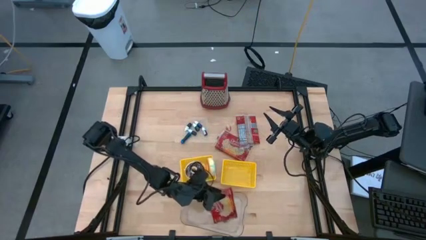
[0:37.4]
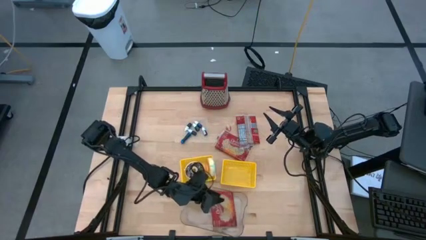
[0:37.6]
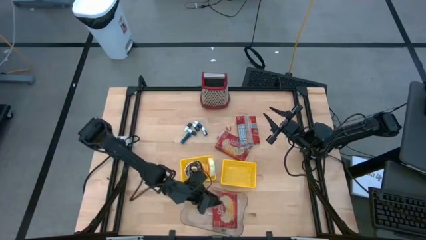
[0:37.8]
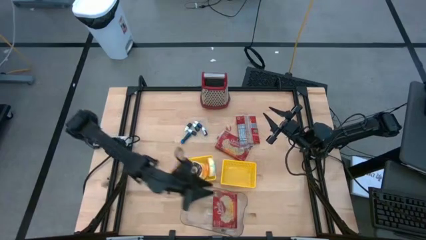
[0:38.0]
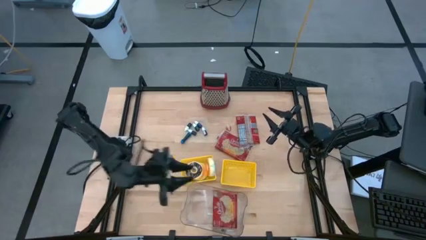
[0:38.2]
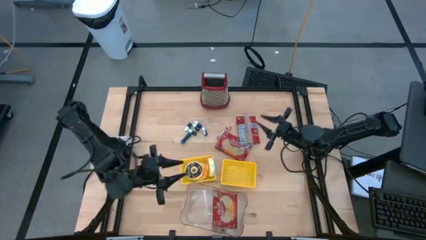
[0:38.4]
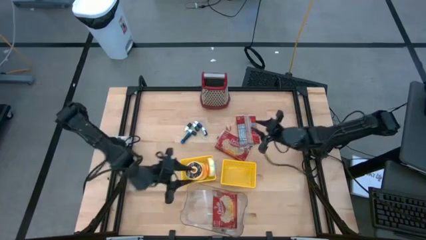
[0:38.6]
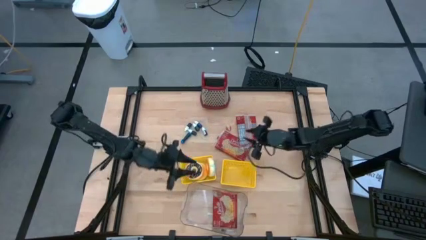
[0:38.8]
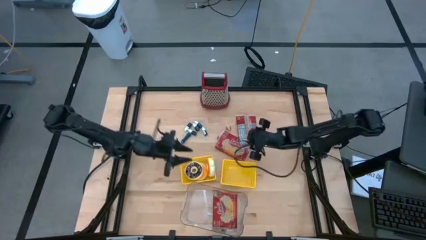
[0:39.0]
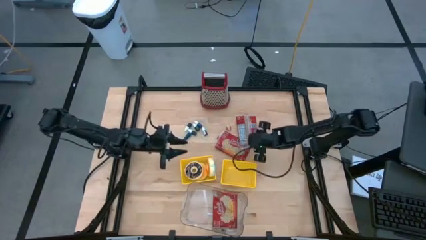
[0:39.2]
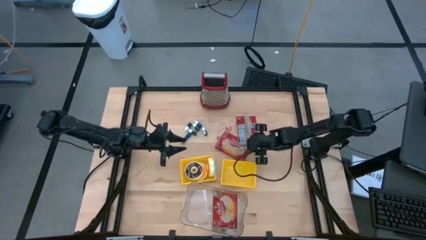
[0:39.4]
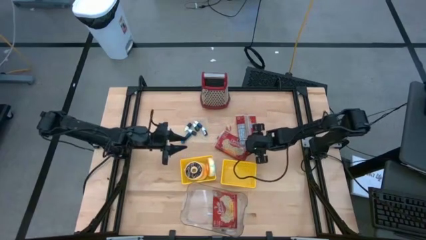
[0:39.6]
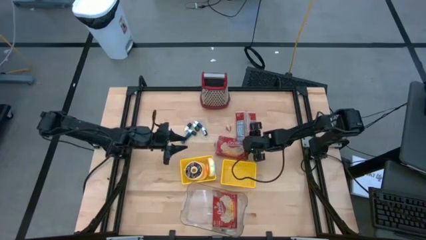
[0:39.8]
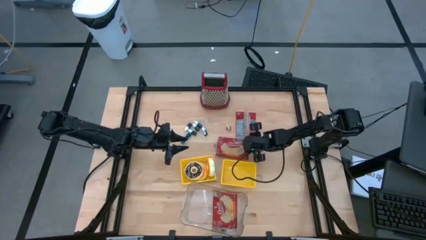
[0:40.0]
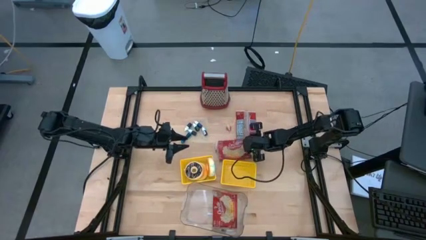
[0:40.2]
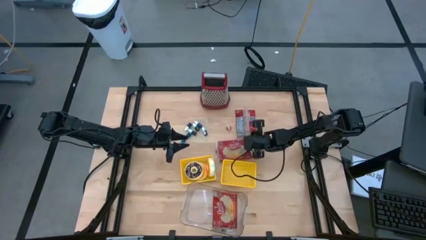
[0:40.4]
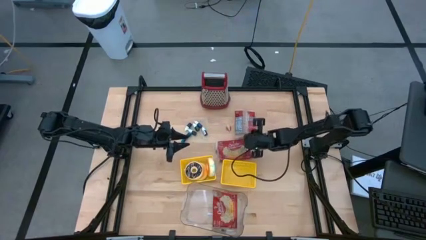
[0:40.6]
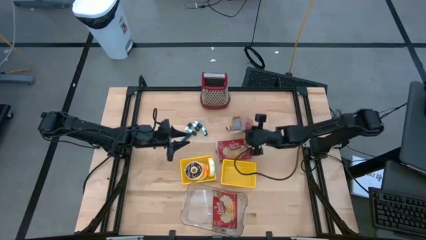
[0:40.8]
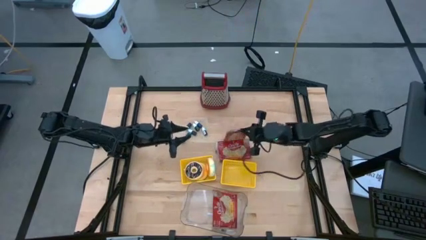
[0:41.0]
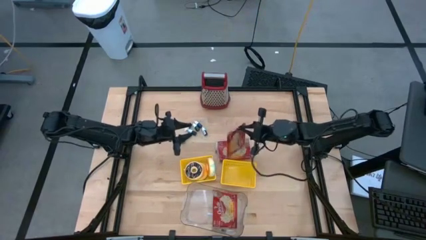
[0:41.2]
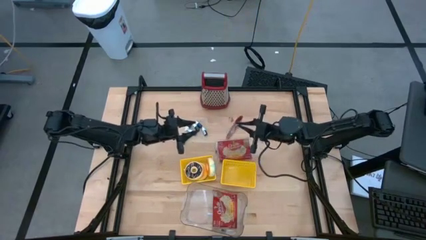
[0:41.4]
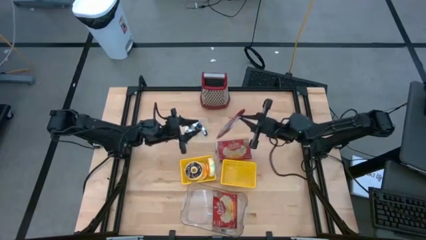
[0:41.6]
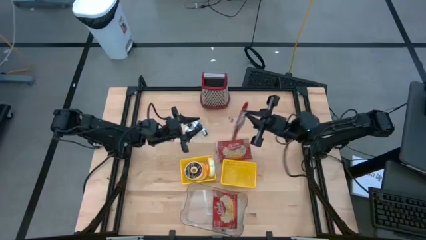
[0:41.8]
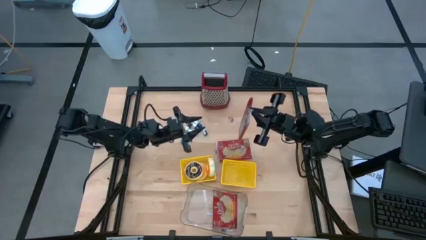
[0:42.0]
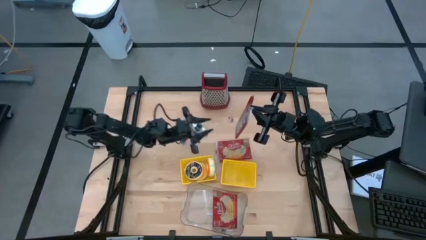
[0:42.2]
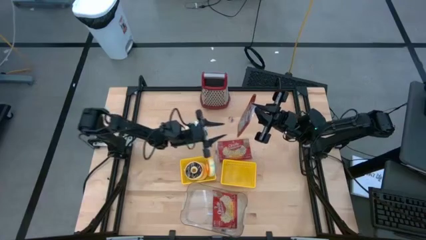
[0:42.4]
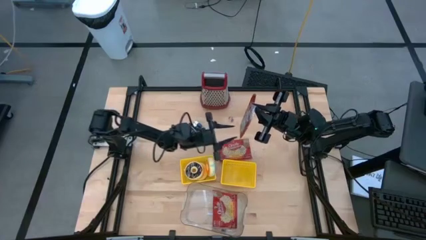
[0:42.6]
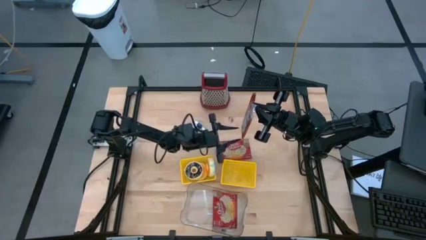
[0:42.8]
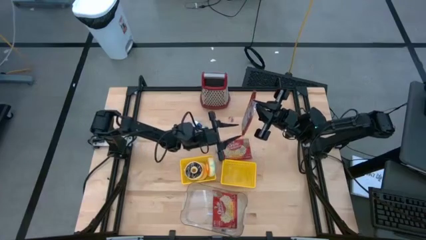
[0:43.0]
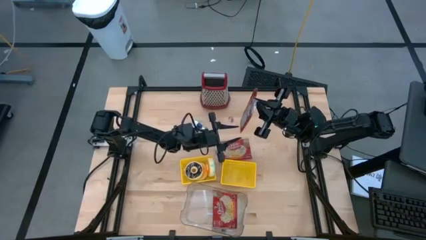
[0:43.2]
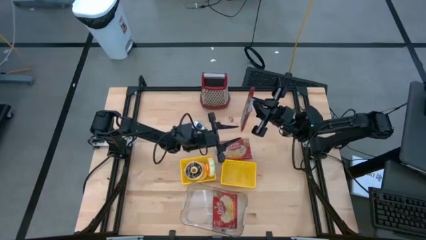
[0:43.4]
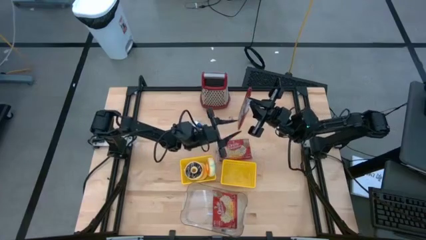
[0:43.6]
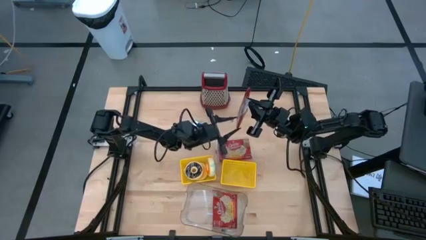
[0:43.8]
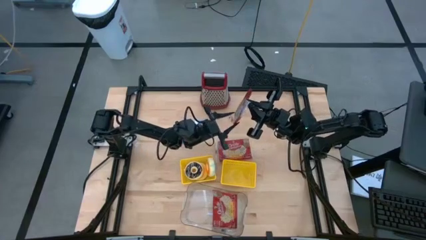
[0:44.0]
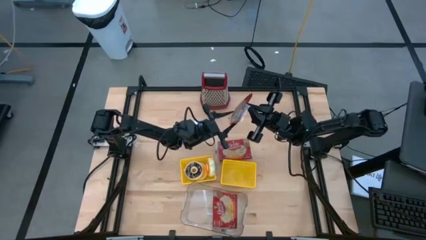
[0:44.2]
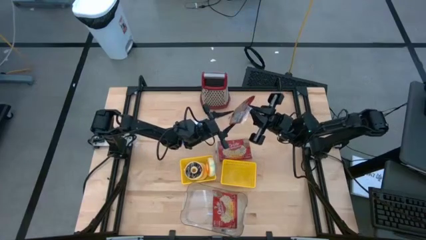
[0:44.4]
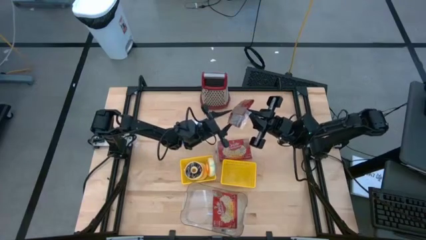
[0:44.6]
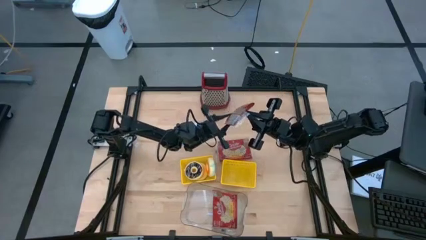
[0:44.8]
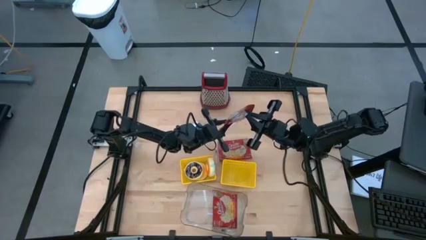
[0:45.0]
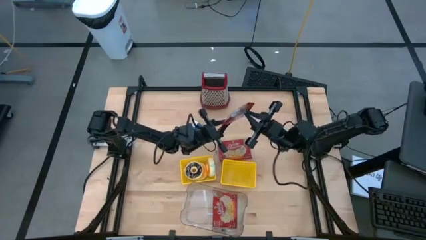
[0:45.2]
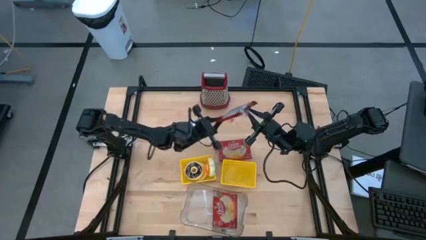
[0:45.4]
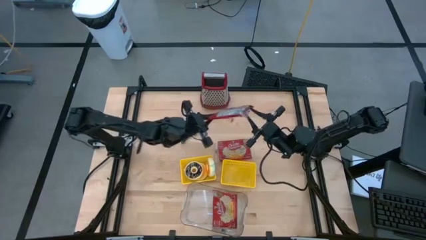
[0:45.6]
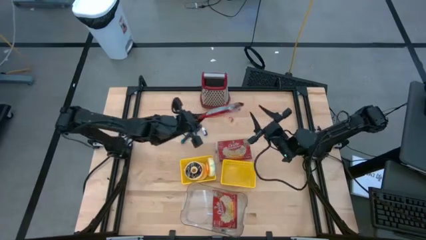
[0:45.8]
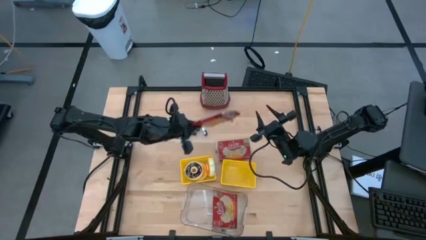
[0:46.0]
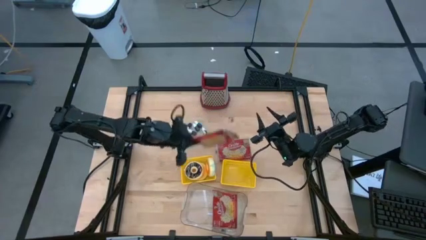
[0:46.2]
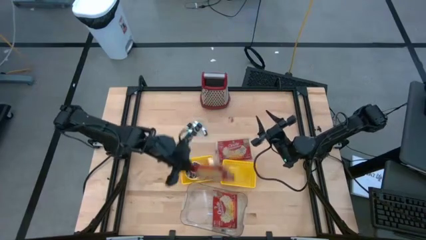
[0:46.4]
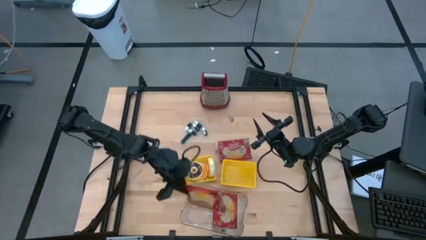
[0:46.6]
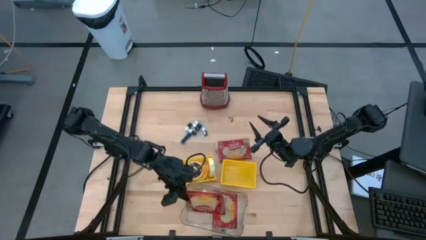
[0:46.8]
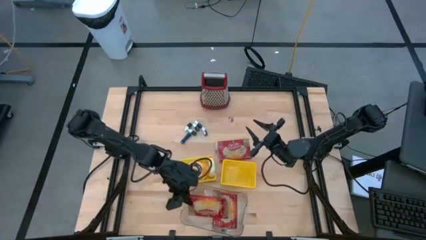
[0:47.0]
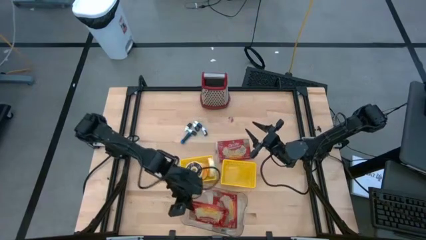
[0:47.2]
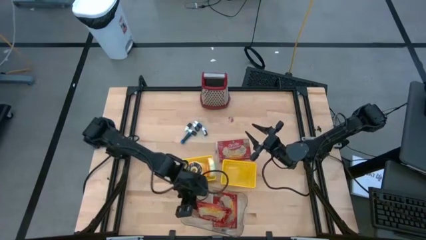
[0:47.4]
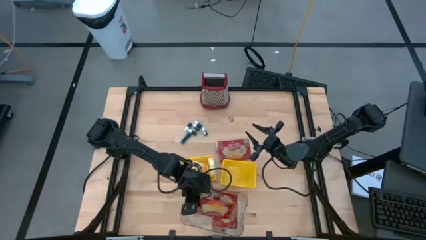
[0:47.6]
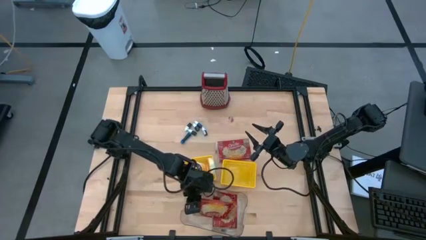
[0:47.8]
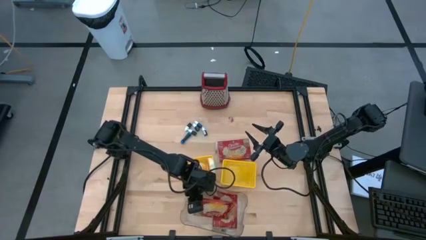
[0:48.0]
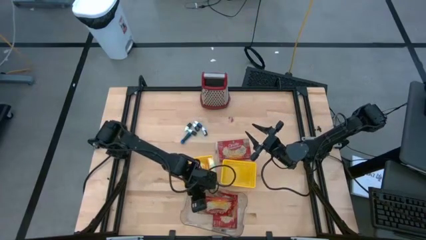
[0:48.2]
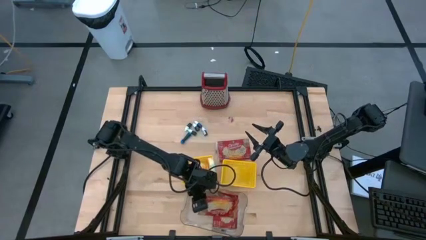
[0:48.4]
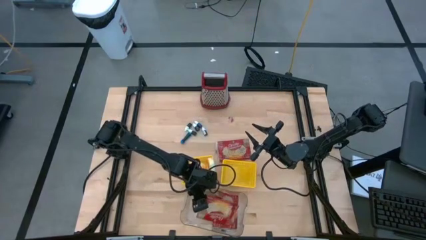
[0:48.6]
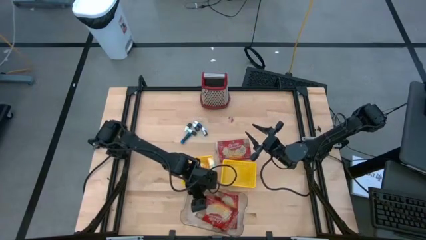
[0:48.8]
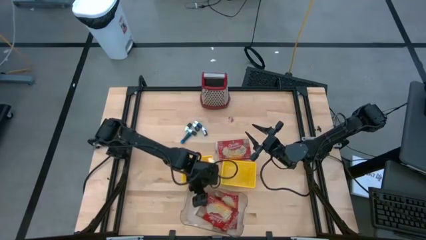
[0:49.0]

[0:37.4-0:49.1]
Put the top red popcorn bag into the transparent bin

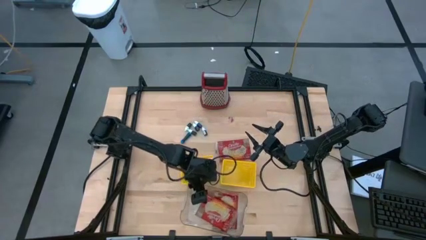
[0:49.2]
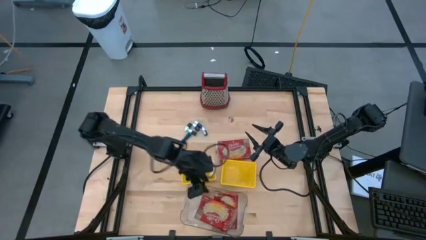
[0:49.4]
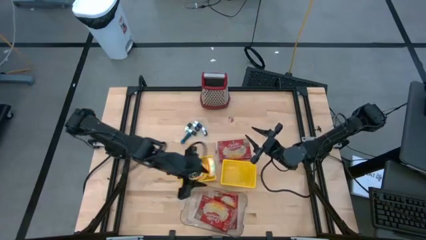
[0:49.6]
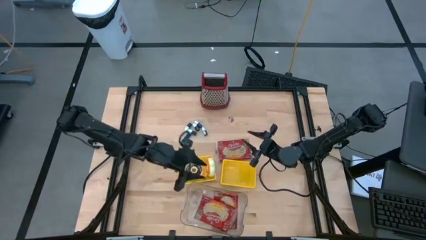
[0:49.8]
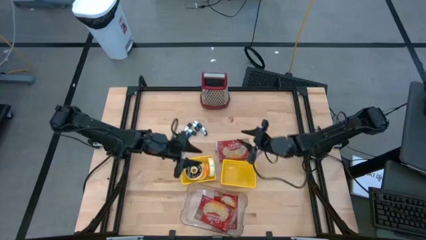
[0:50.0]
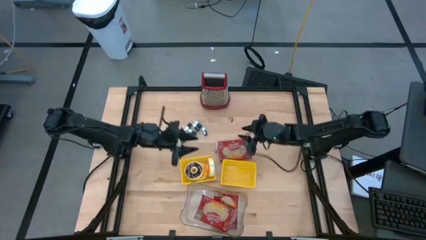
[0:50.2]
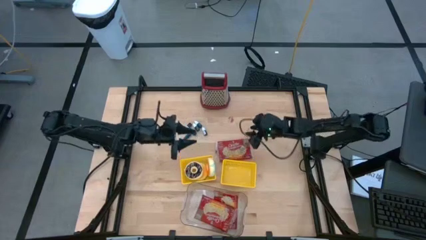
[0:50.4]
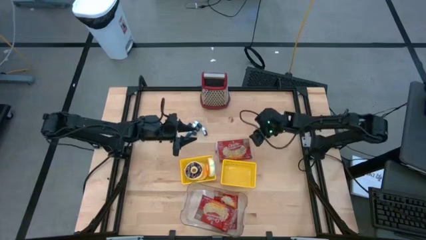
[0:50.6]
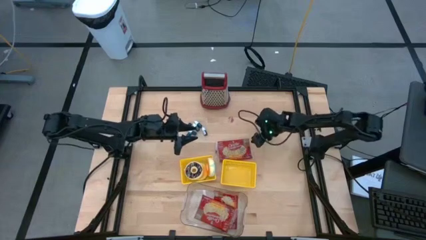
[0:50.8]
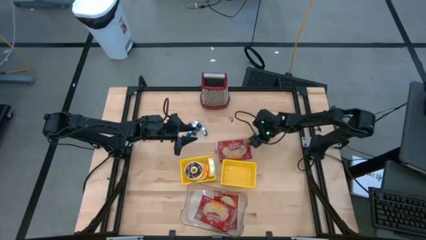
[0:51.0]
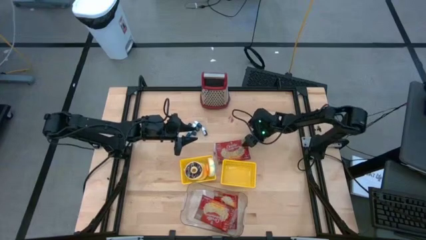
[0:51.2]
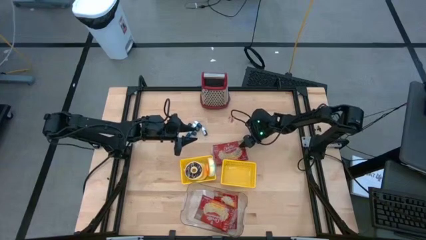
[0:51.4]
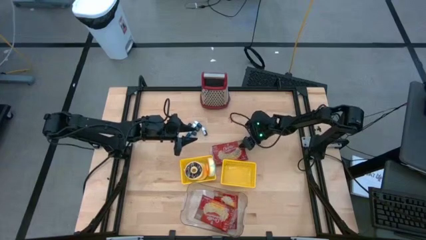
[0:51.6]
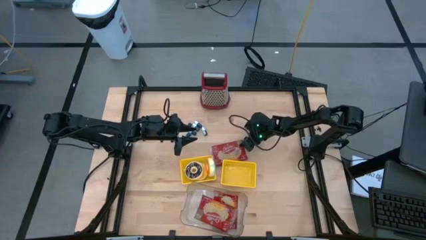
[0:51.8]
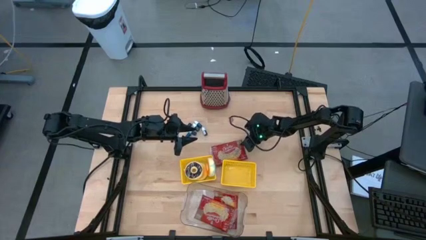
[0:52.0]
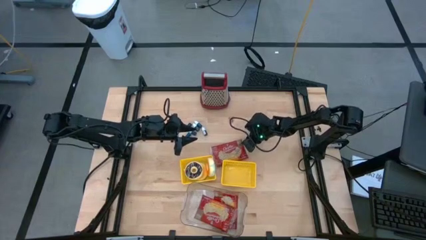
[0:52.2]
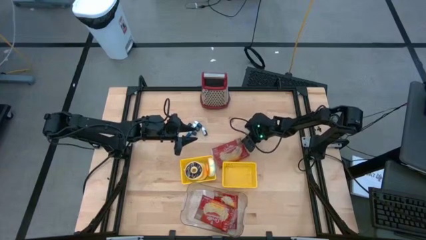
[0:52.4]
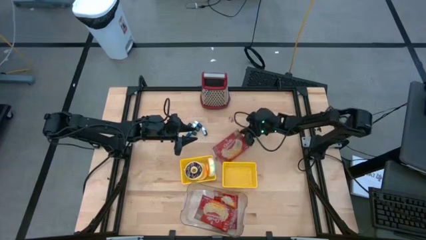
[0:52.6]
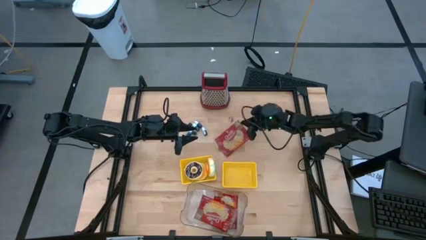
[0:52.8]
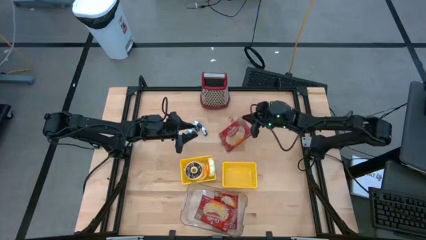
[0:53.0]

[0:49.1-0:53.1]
Put the red popcorn bag into the transparent bin
